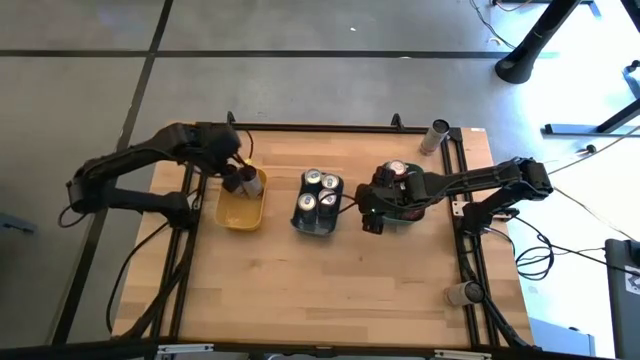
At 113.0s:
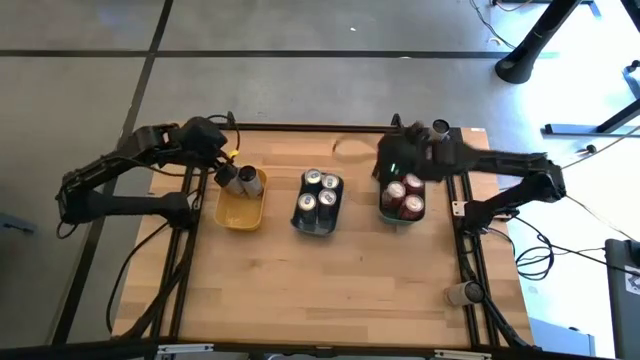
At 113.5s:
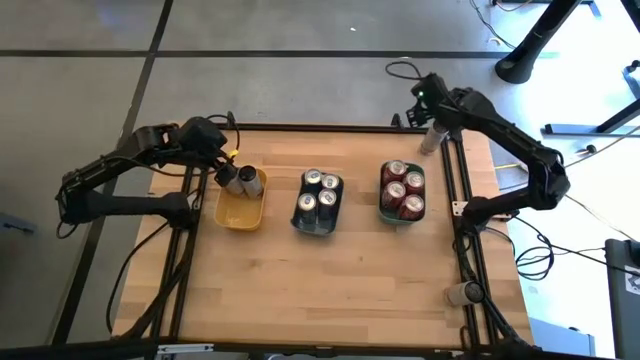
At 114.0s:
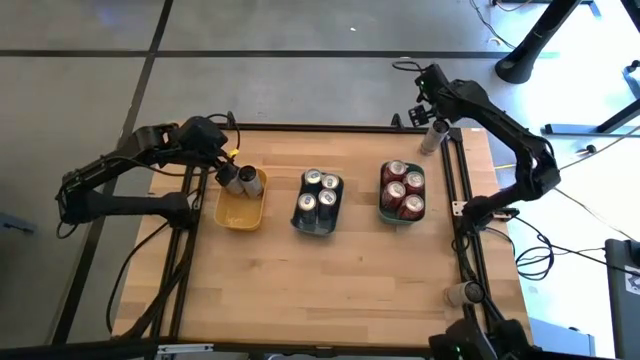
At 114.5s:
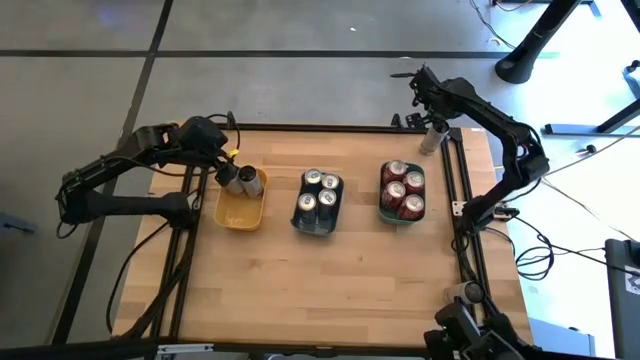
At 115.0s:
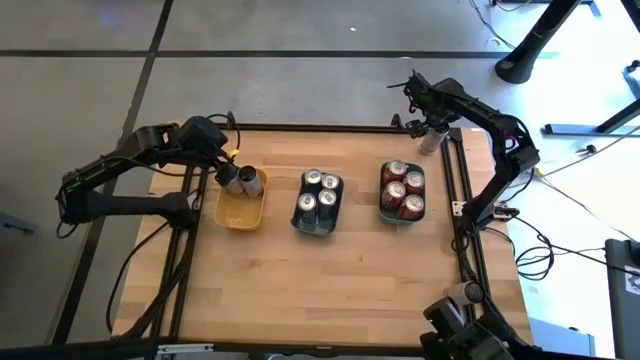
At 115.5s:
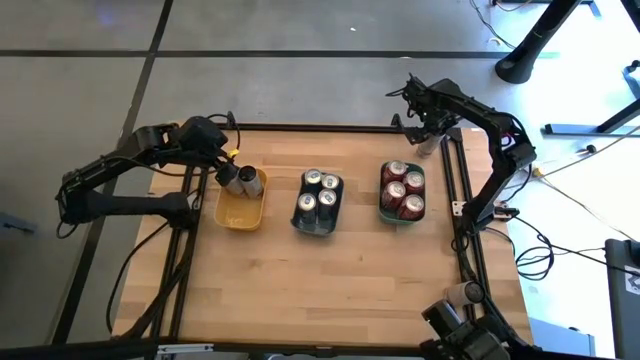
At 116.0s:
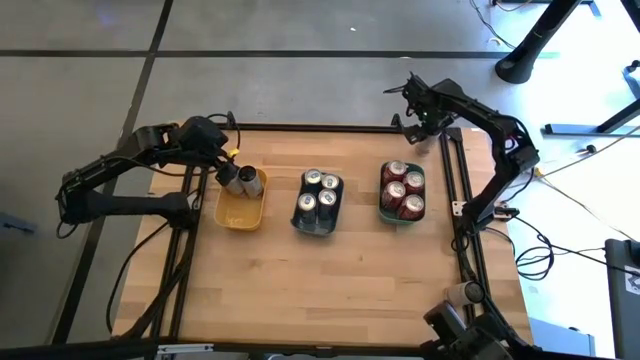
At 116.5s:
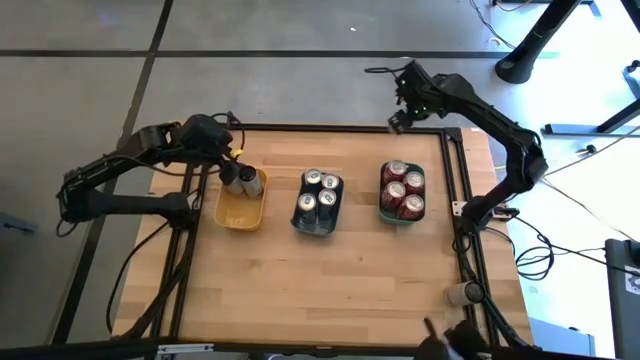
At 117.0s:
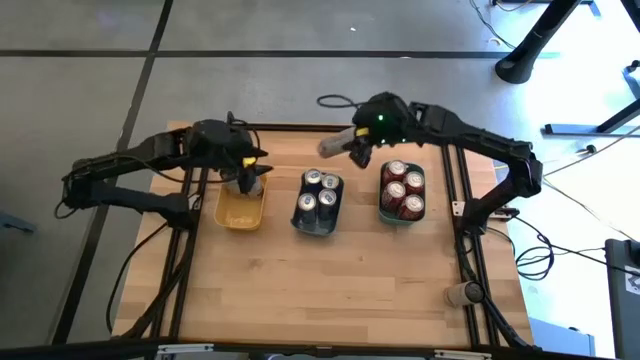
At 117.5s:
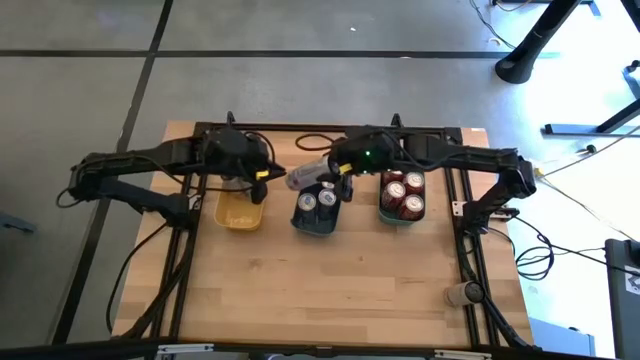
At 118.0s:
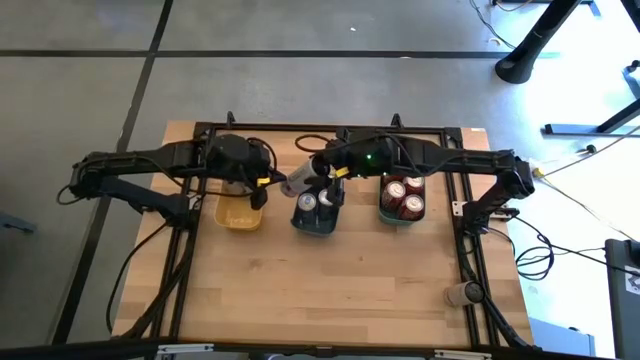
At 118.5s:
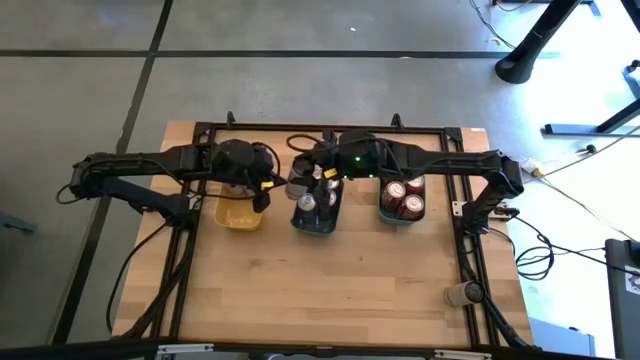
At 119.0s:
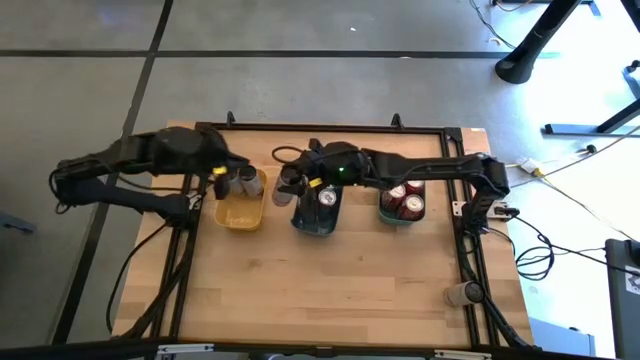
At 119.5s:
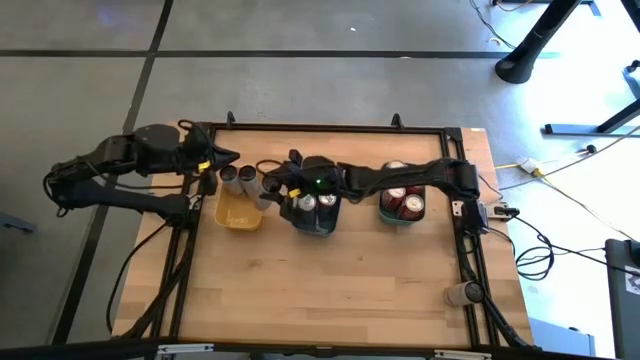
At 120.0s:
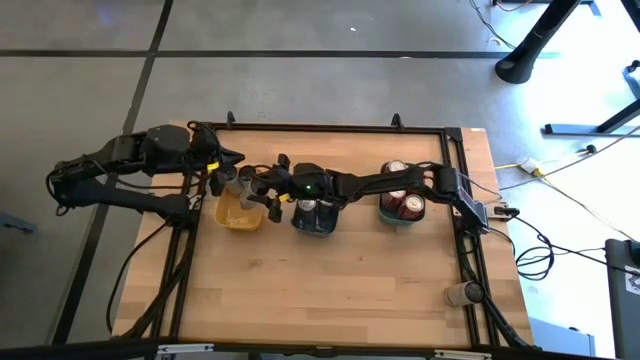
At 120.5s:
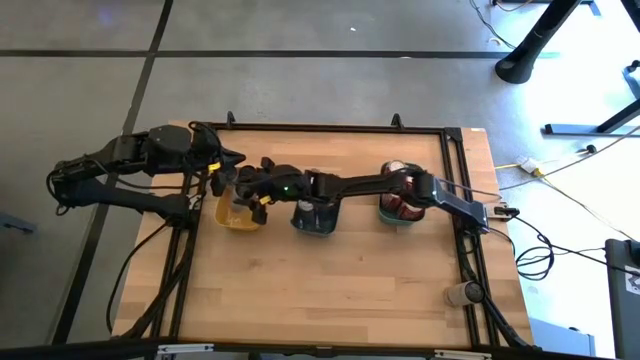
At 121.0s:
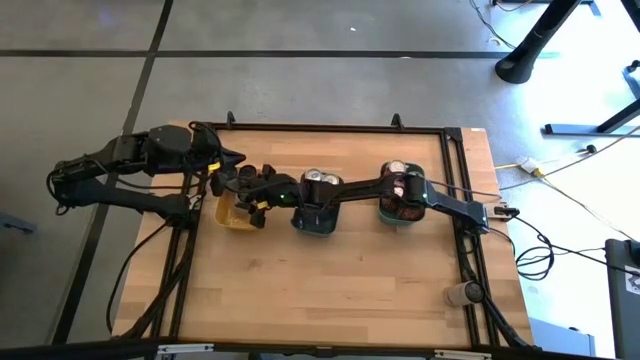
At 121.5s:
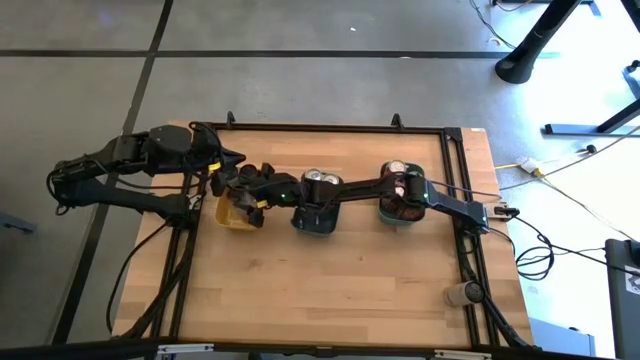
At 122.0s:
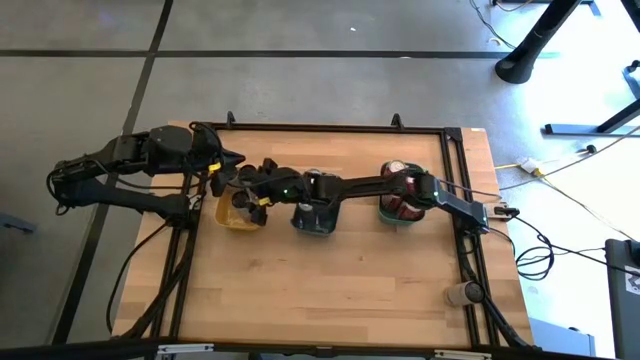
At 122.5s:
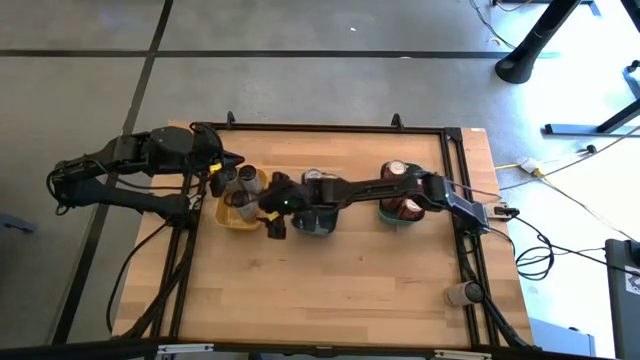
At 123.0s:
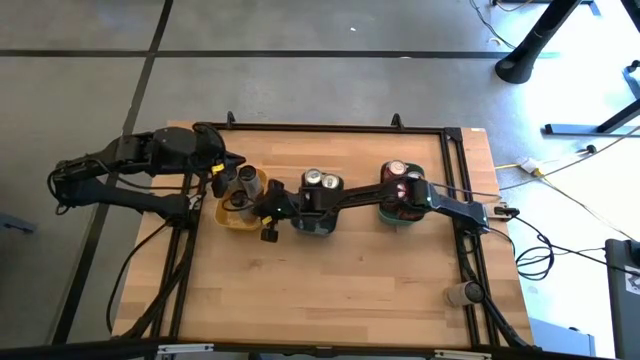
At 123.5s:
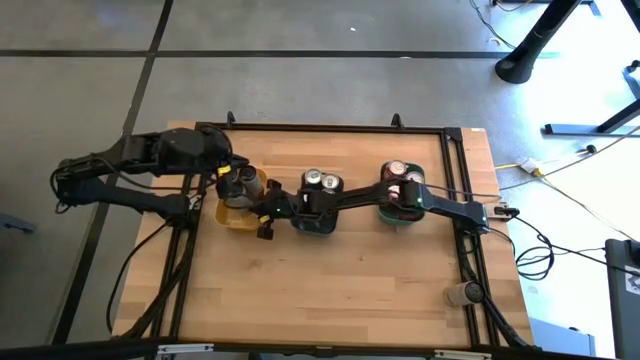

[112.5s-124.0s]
Task: Sort soda cans
Put the white pink soda can into yellow bin

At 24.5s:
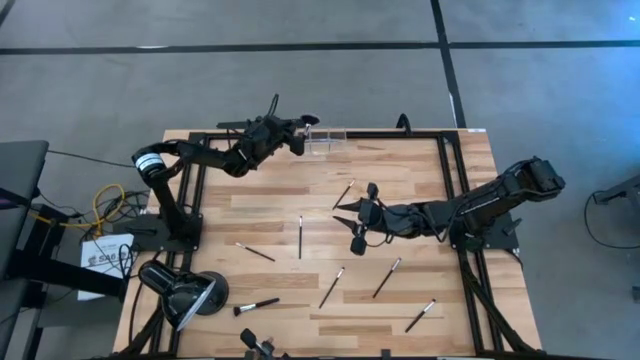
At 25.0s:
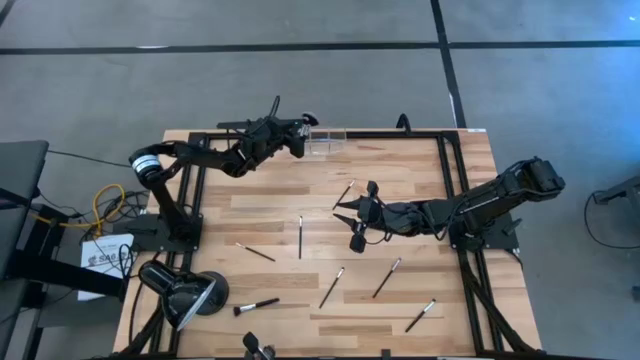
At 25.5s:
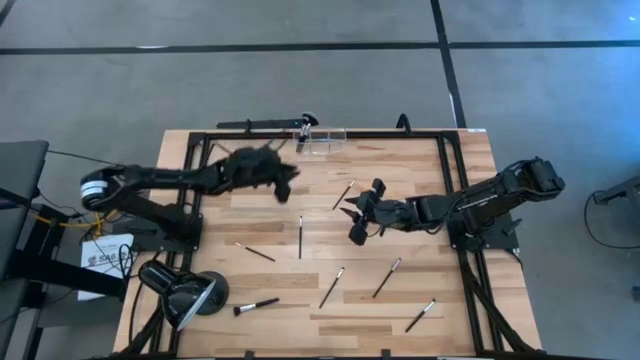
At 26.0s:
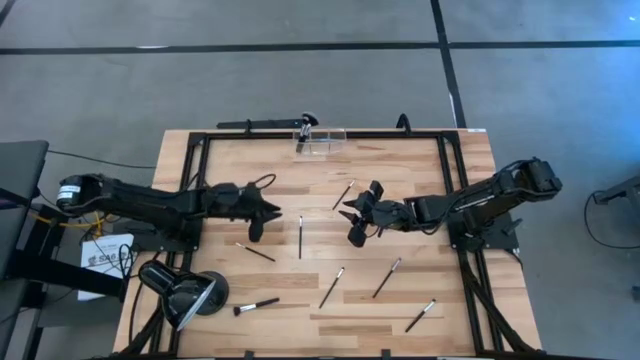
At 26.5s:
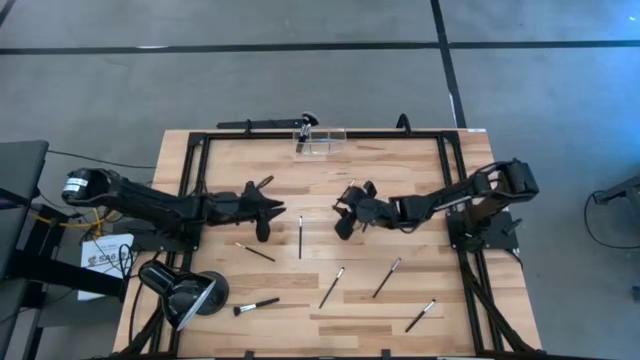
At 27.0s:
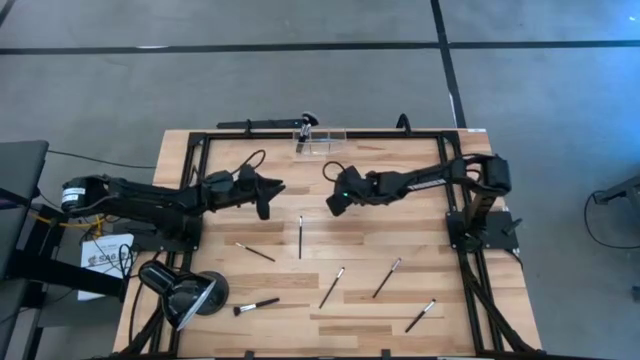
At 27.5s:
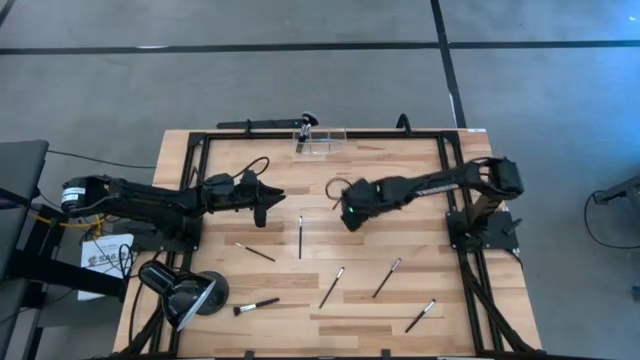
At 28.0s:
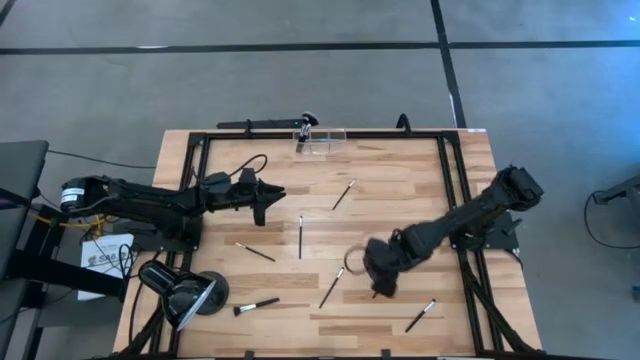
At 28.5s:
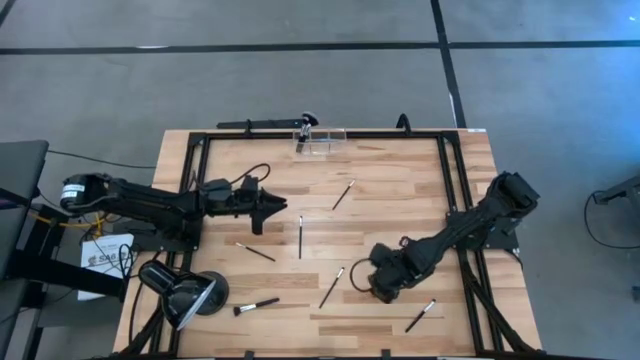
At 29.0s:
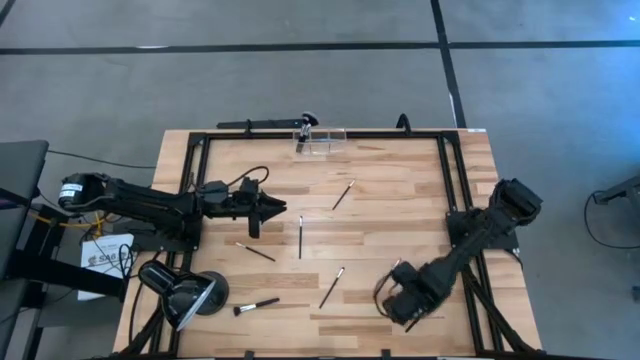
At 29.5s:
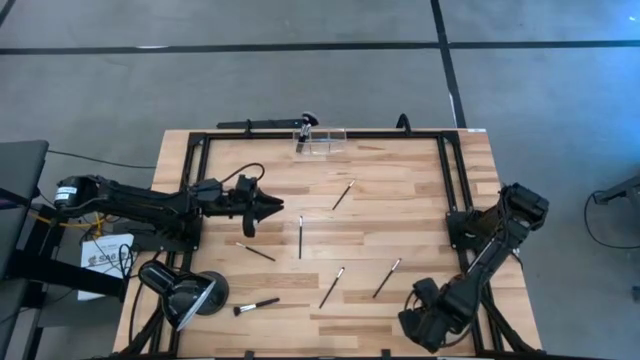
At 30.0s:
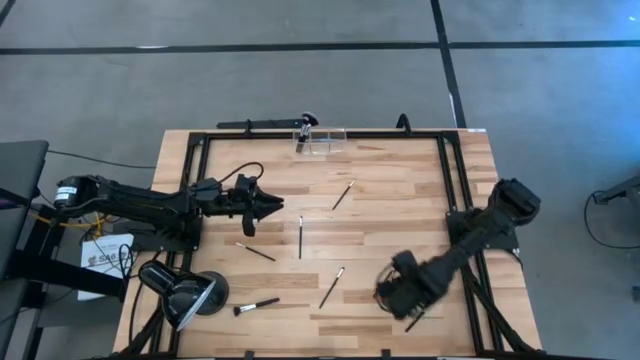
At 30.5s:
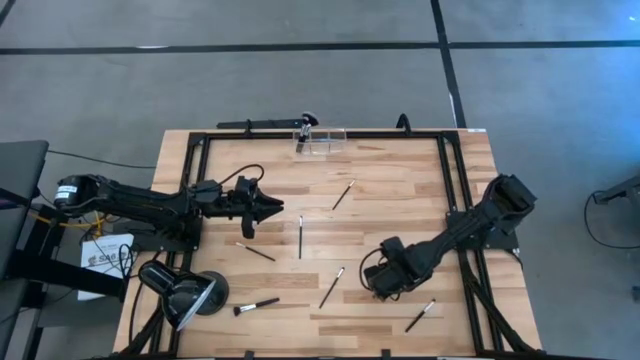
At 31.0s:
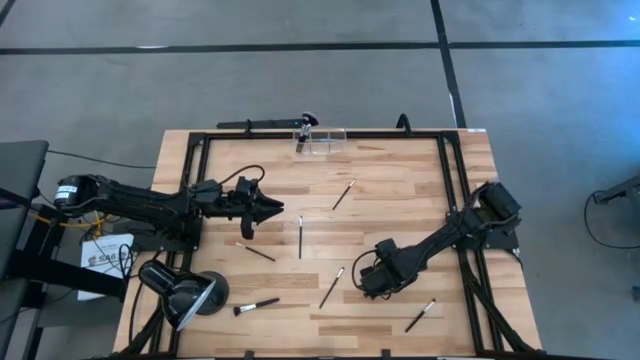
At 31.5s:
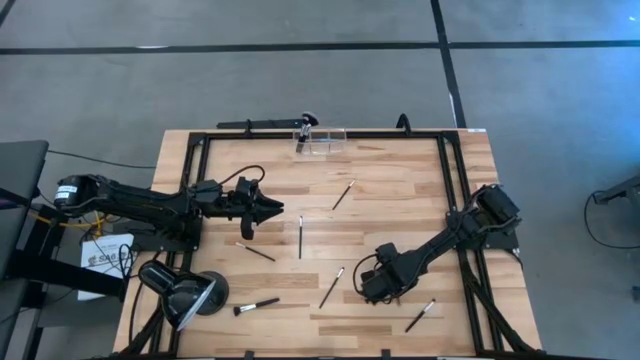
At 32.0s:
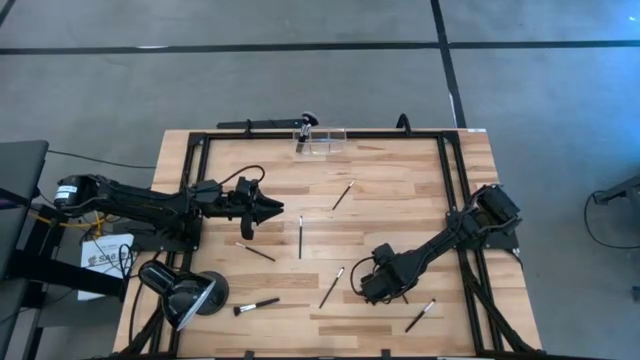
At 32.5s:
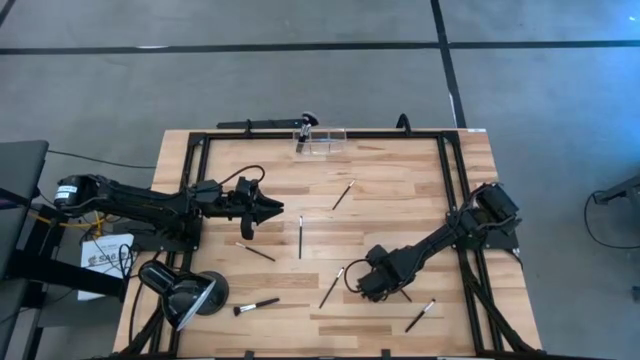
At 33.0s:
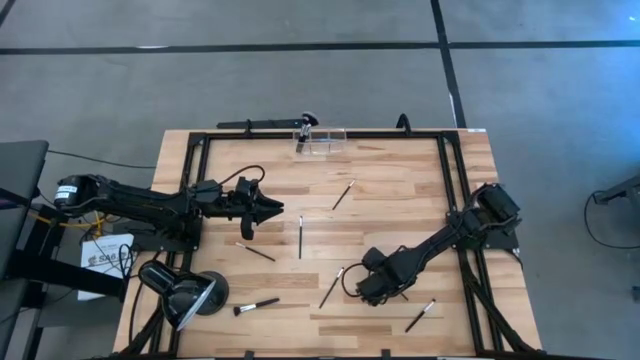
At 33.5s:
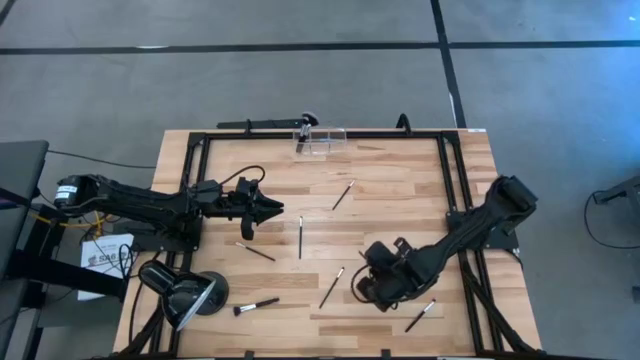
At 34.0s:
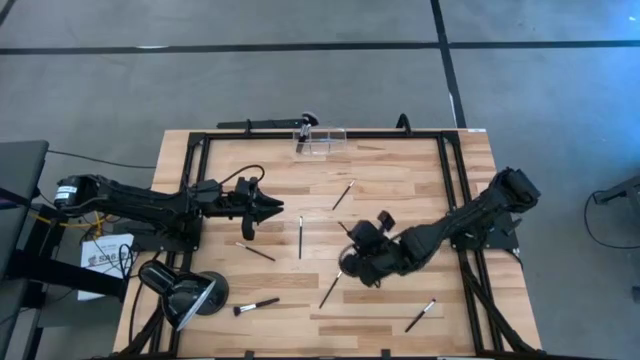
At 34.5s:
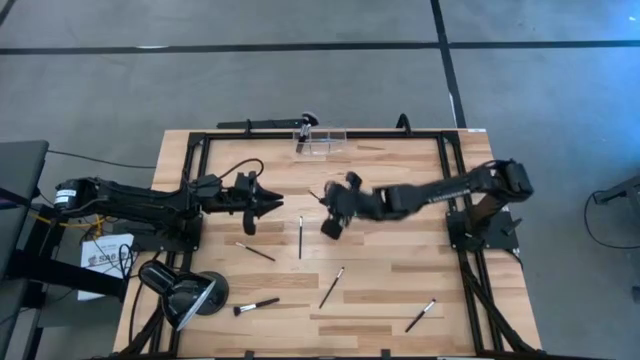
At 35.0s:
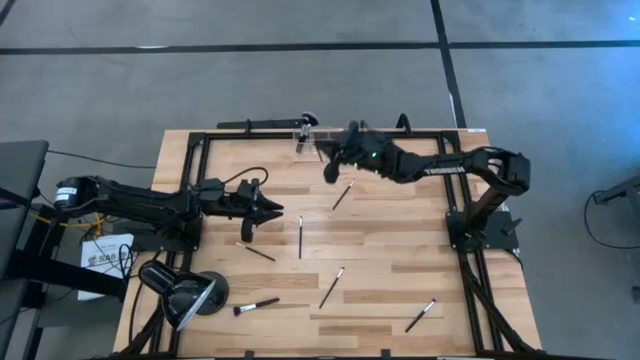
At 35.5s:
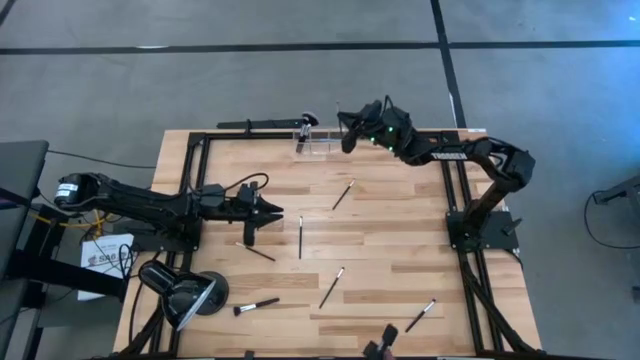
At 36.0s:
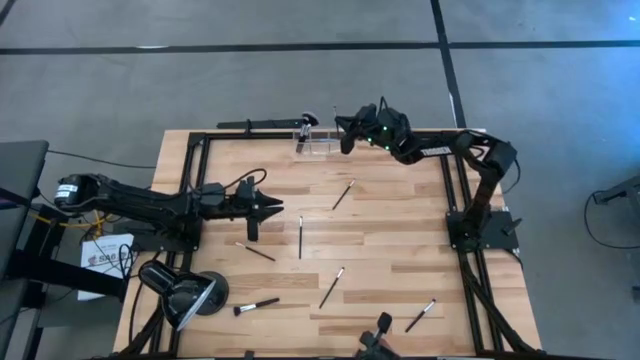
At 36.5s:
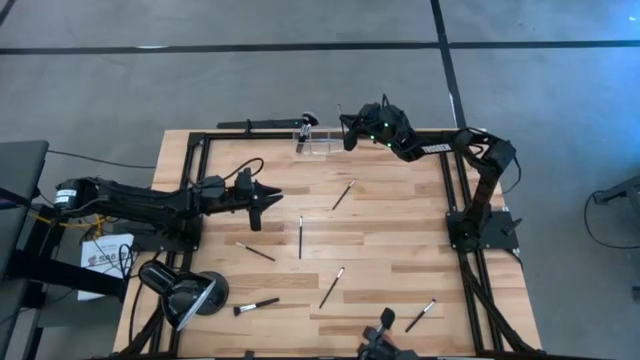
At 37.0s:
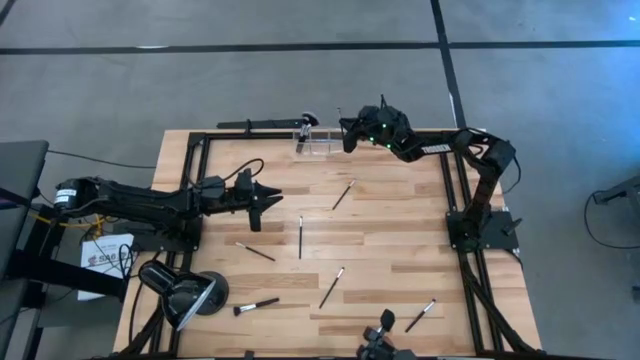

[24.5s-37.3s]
Task: Sort items
Put the eyeshadow brush into the right section of the transparent organizer
